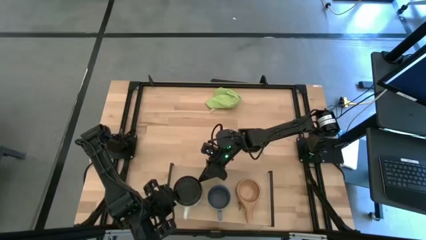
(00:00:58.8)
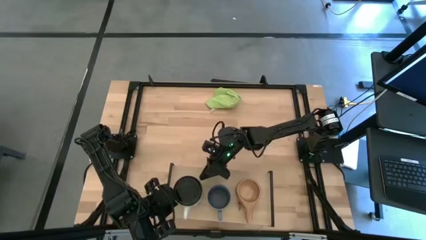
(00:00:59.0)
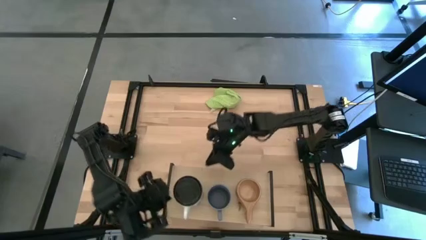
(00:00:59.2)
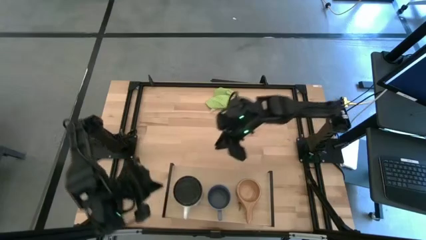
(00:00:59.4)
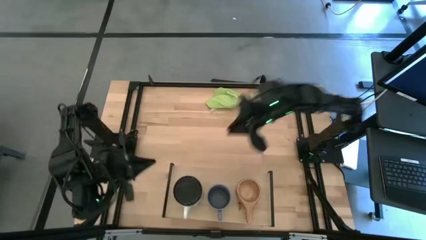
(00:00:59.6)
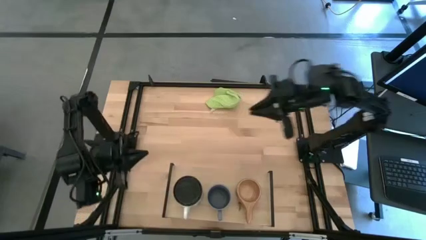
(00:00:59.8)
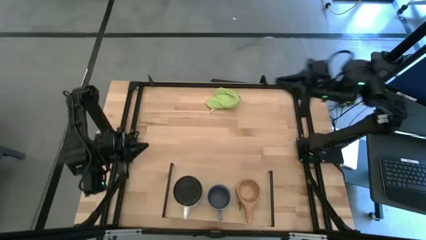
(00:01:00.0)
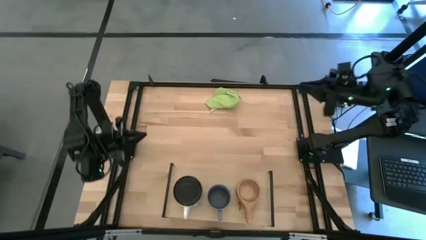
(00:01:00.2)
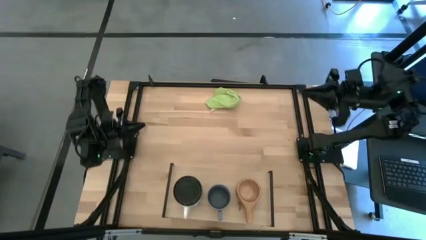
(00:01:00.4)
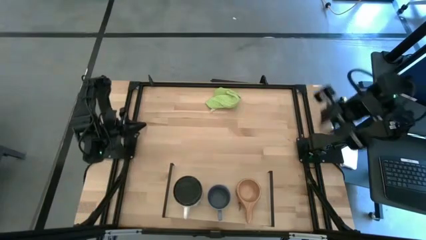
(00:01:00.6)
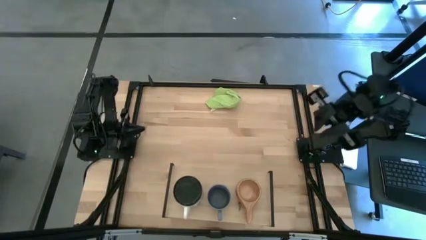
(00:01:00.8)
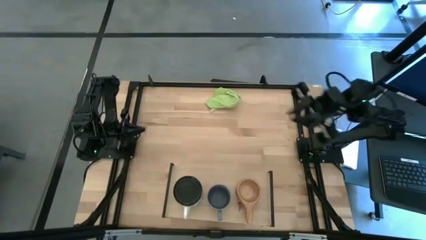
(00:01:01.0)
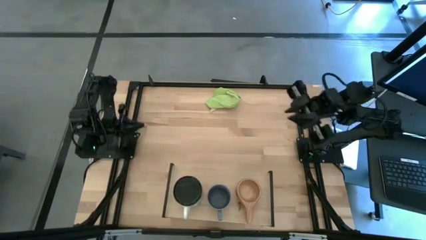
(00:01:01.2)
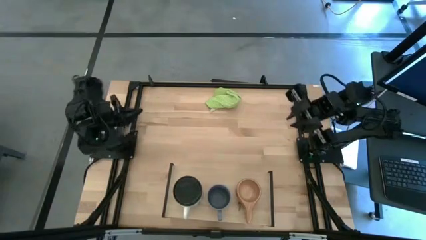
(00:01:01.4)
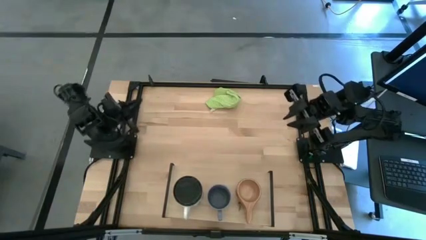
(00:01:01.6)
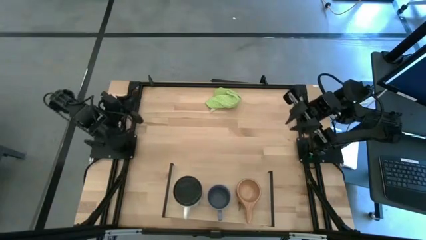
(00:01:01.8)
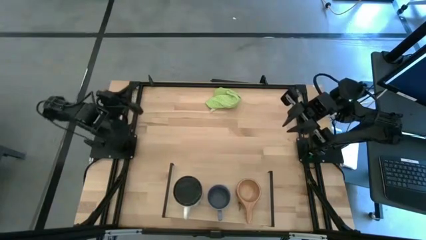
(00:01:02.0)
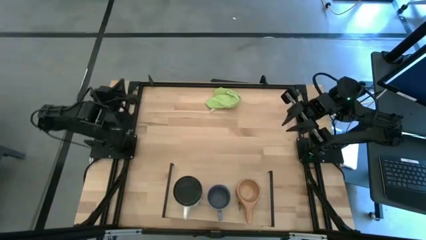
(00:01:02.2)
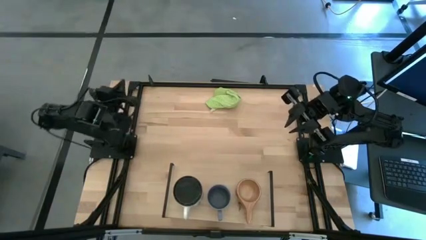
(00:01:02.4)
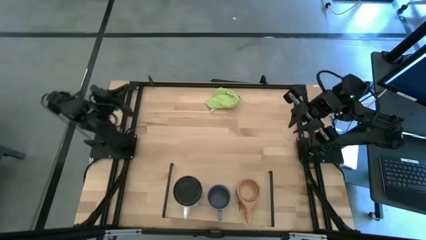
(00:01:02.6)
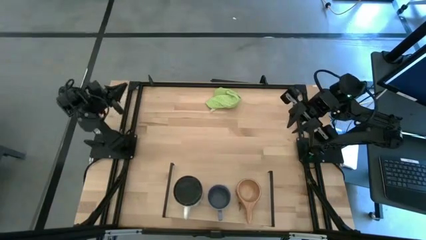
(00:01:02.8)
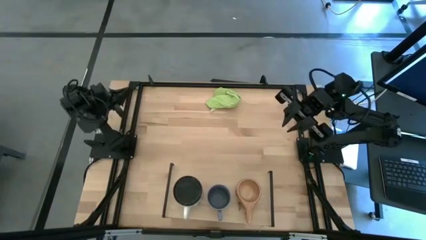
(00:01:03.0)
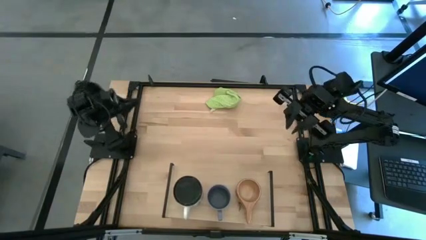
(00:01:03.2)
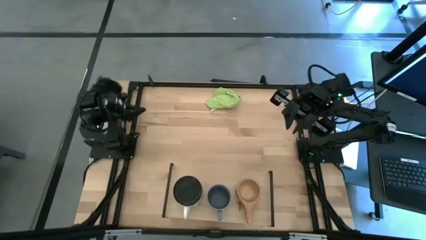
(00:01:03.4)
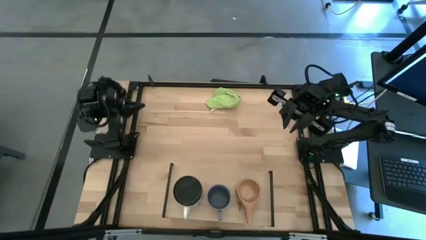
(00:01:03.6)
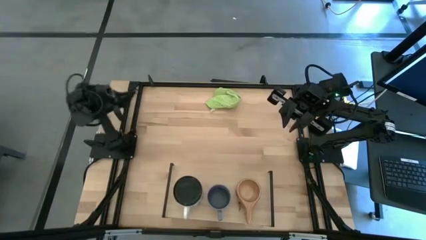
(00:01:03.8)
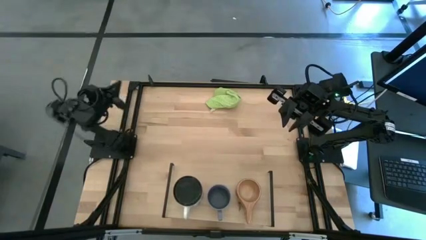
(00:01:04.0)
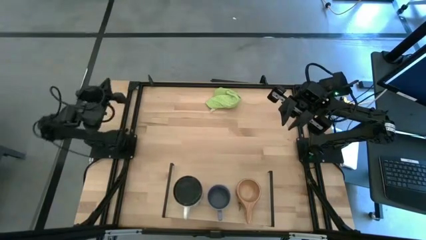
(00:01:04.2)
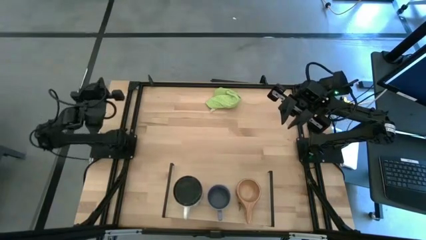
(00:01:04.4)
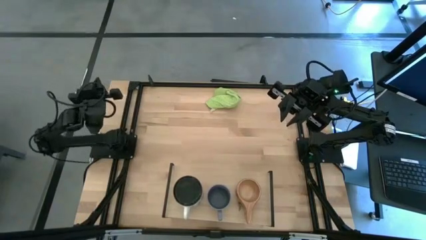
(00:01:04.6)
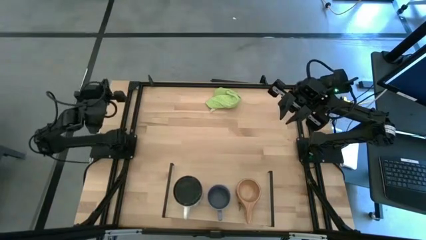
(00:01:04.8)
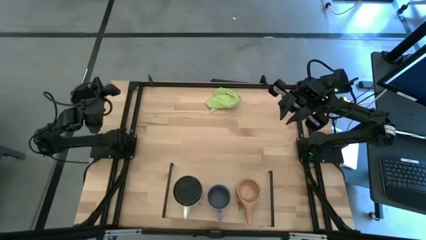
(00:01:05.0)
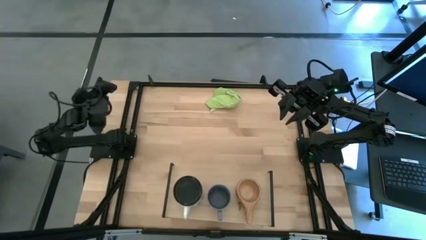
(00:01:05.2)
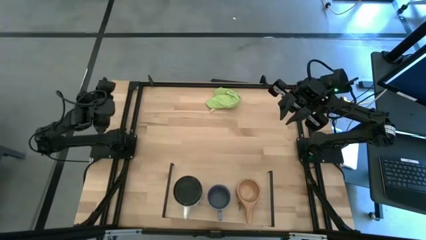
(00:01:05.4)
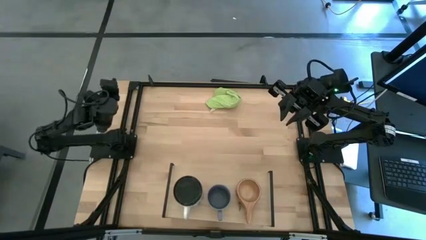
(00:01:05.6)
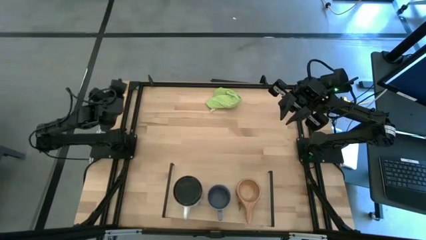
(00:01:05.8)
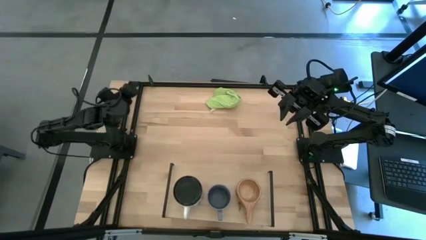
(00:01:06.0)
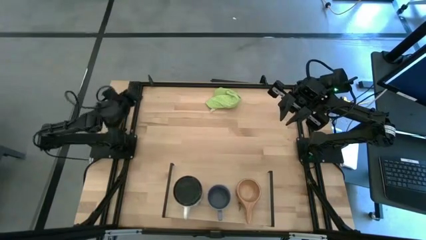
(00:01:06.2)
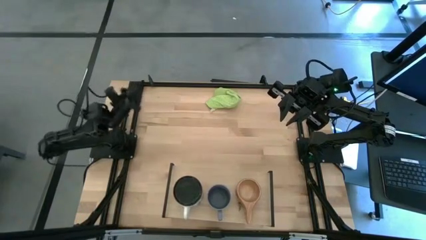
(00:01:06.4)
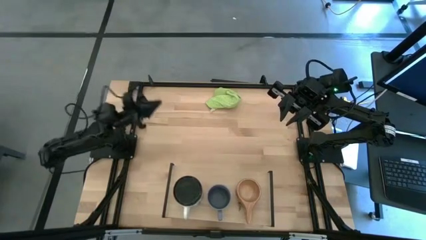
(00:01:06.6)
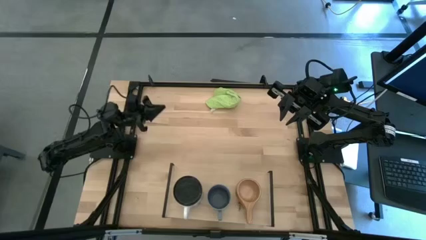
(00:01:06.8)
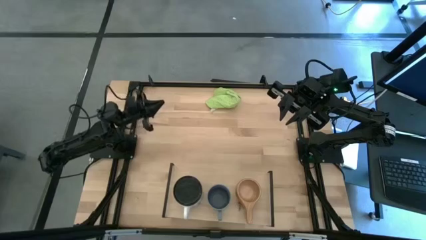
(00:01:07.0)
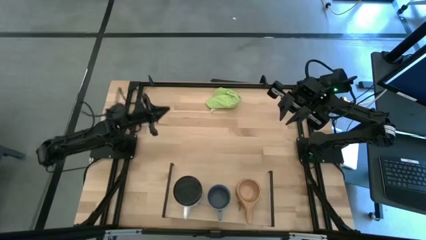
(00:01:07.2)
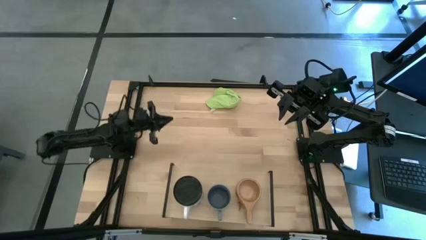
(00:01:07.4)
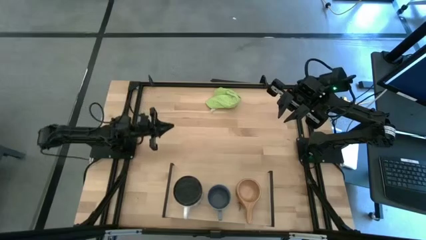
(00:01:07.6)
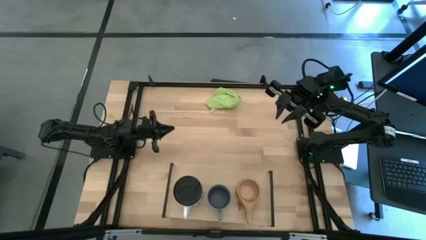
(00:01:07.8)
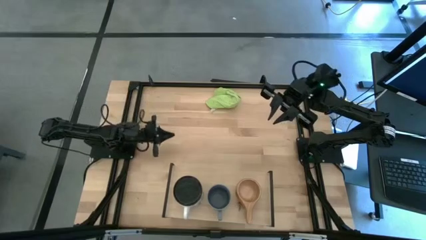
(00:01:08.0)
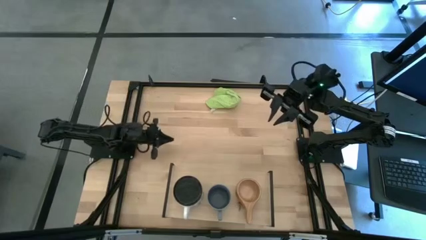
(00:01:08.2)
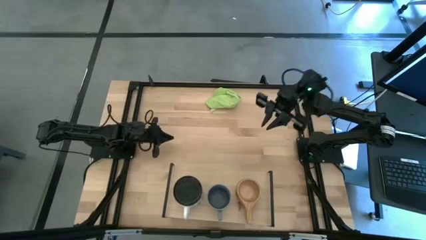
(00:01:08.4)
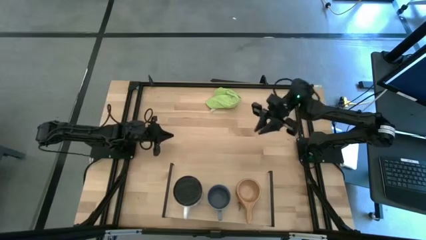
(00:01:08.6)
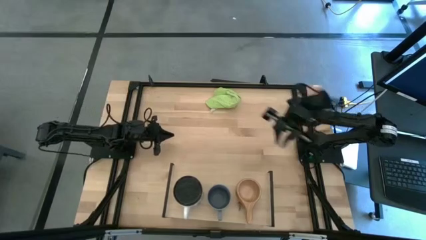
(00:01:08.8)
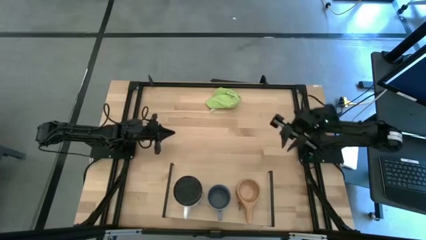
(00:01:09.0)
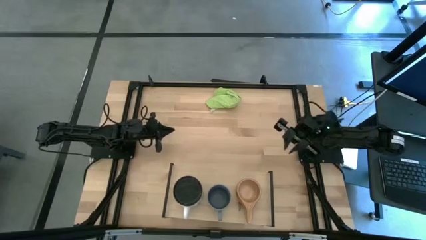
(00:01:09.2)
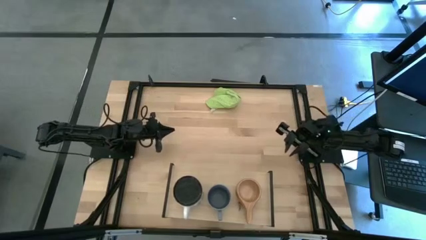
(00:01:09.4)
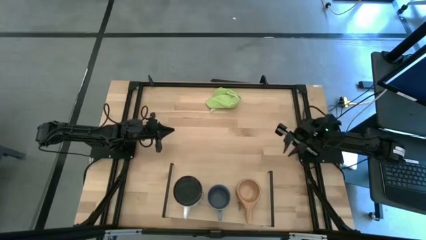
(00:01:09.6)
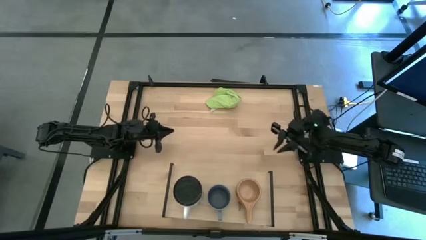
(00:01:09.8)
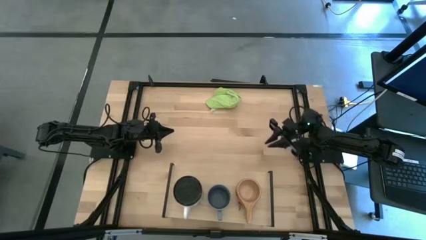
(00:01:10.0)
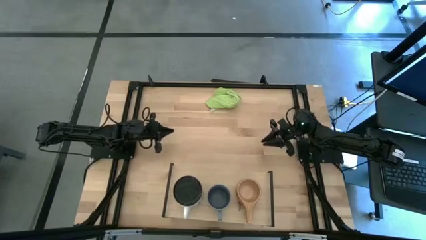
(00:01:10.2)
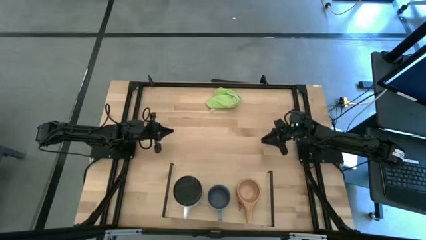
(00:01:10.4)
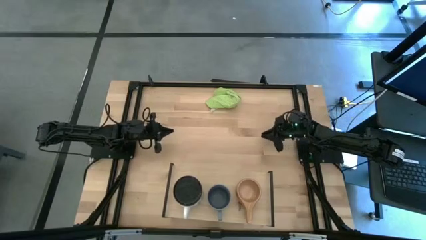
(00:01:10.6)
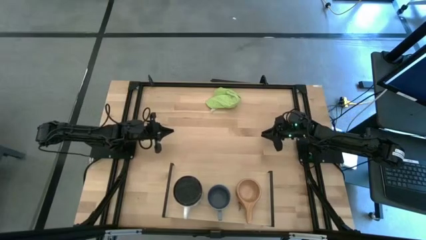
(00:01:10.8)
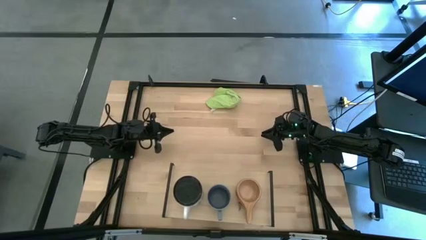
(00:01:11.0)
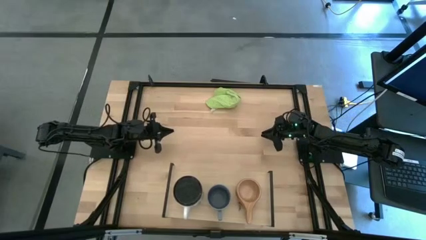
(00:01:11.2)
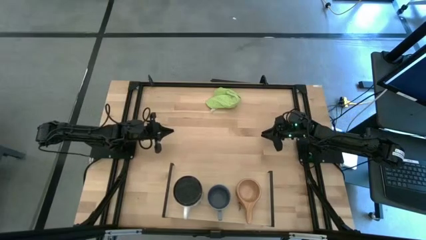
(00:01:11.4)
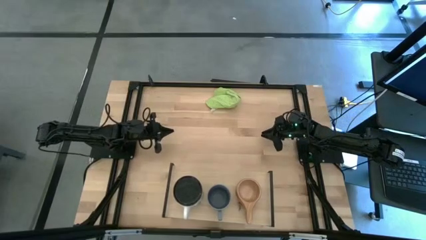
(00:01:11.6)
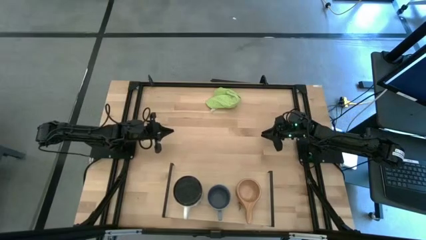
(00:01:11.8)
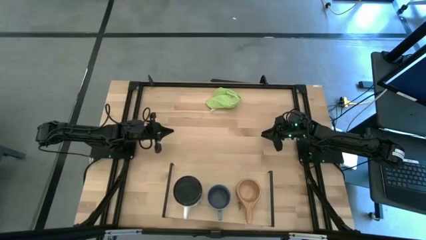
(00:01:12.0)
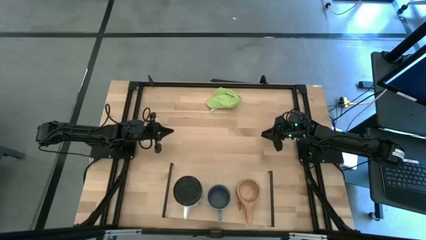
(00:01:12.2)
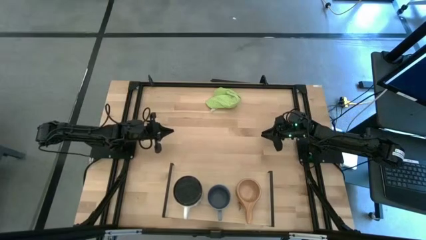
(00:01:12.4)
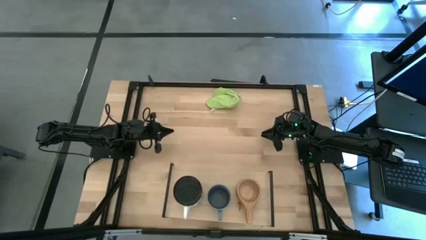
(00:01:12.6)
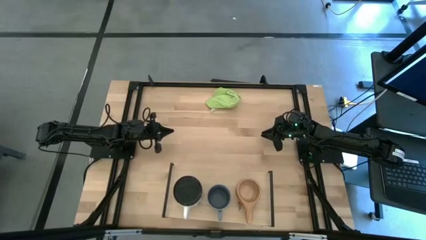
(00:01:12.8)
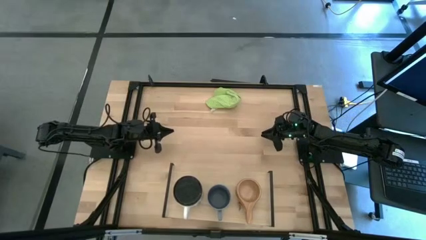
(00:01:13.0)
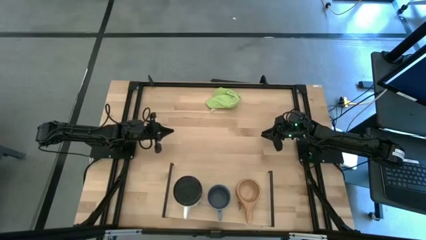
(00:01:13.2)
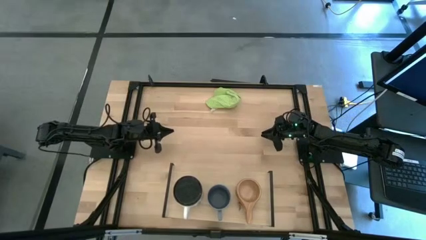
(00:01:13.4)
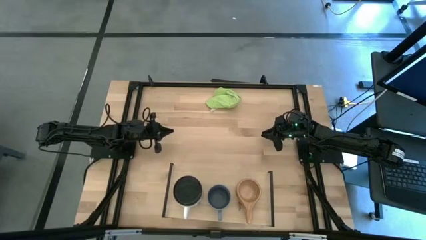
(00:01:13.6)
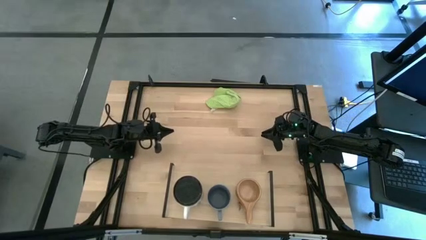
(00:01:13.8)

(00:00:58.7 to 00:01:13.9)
Task: Stack small to large cups/mugs on shelf
Return to Home Position
